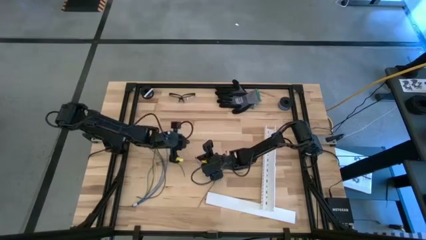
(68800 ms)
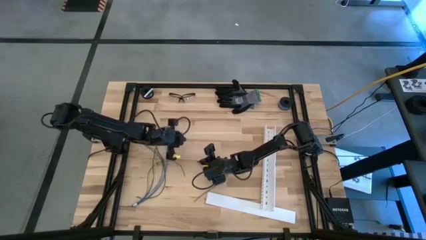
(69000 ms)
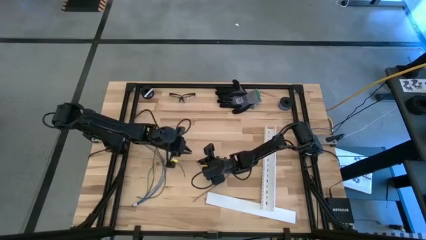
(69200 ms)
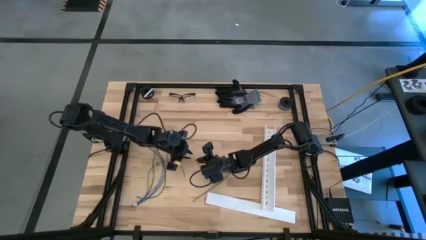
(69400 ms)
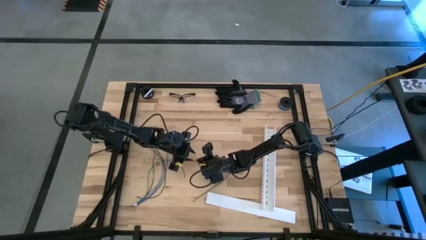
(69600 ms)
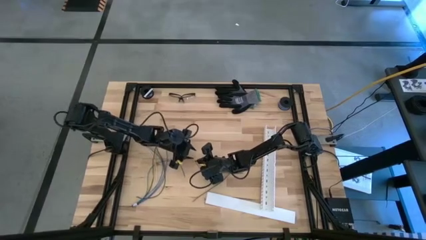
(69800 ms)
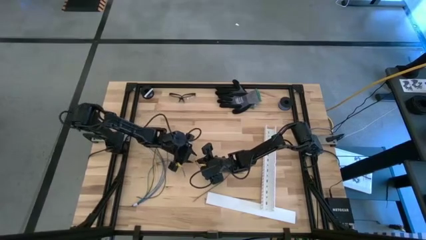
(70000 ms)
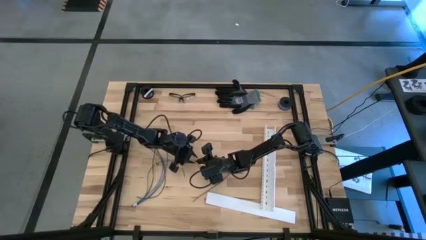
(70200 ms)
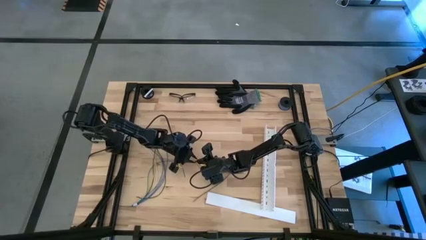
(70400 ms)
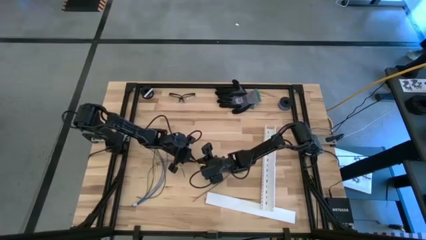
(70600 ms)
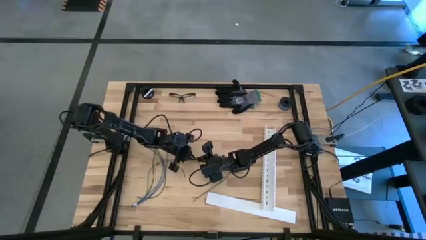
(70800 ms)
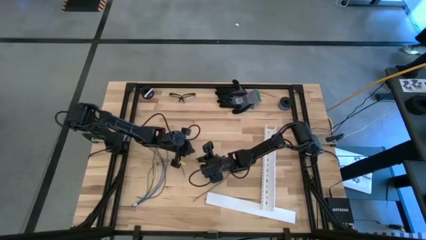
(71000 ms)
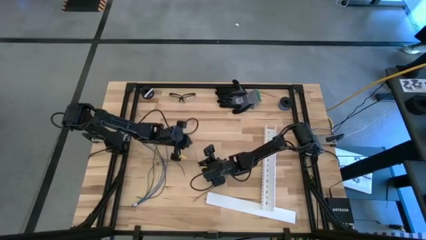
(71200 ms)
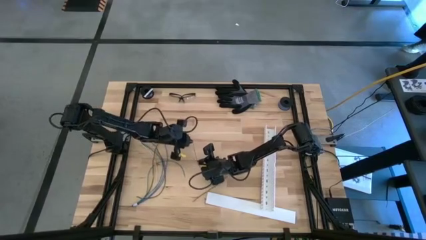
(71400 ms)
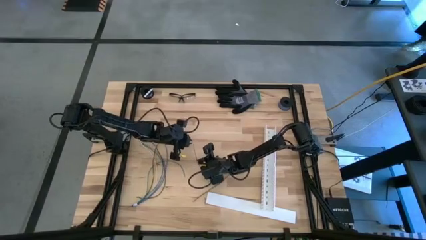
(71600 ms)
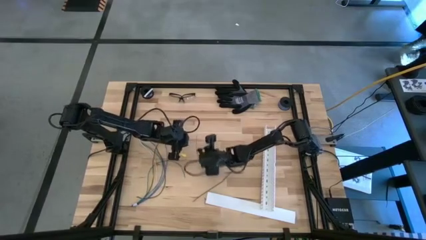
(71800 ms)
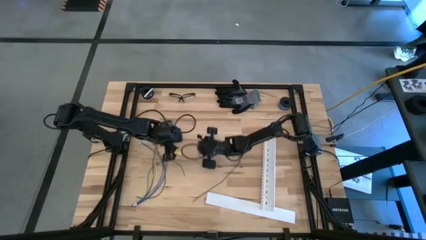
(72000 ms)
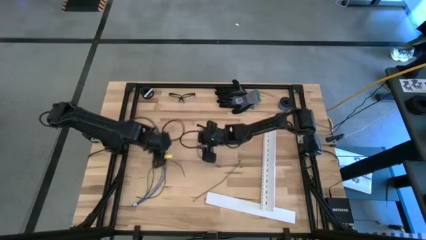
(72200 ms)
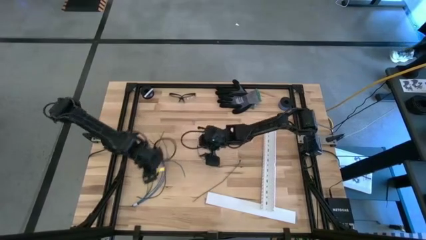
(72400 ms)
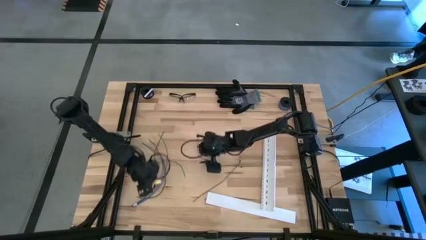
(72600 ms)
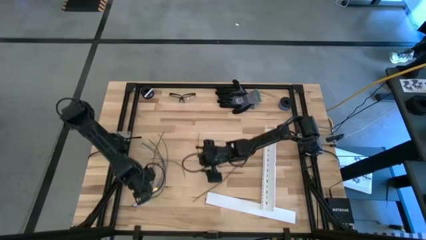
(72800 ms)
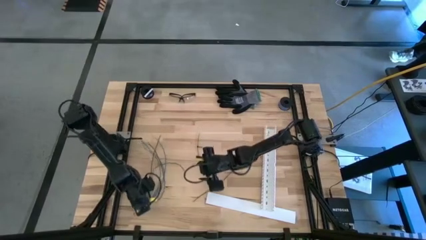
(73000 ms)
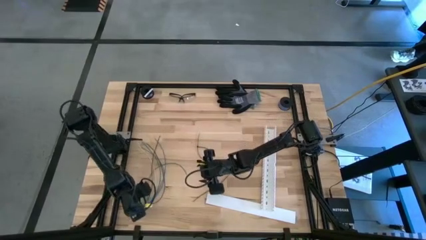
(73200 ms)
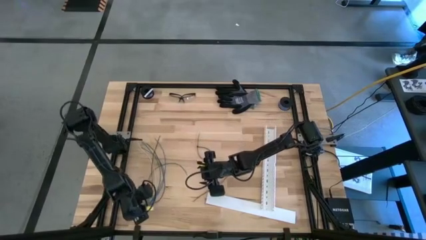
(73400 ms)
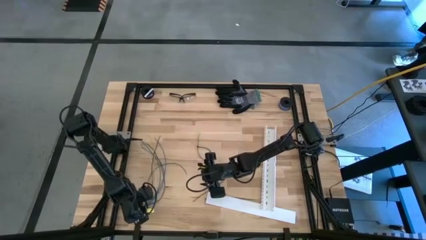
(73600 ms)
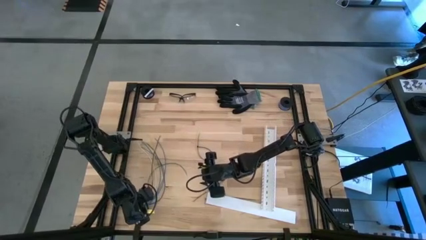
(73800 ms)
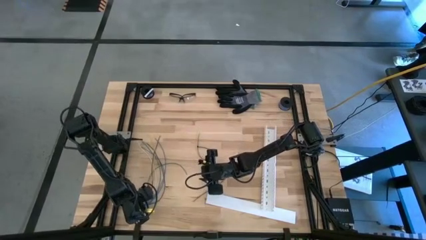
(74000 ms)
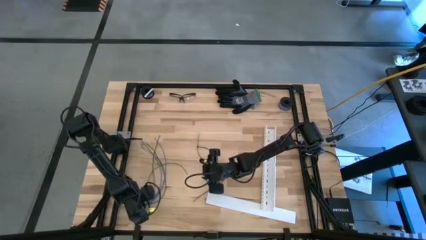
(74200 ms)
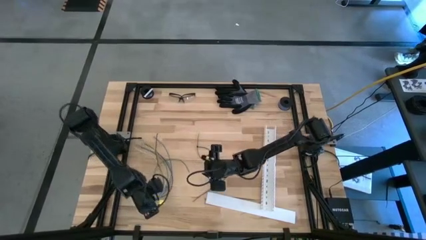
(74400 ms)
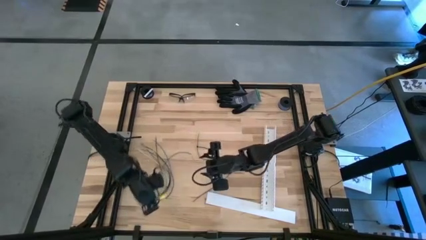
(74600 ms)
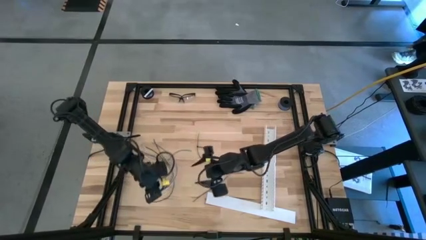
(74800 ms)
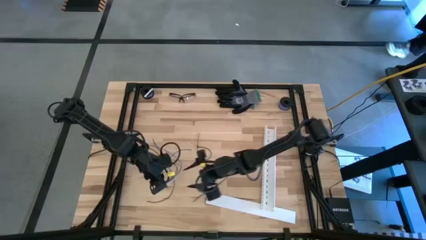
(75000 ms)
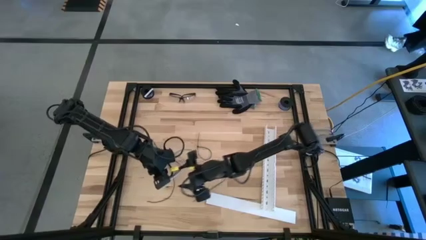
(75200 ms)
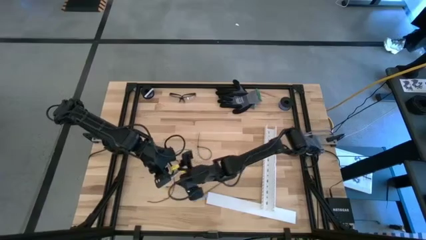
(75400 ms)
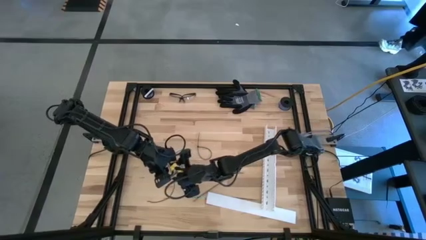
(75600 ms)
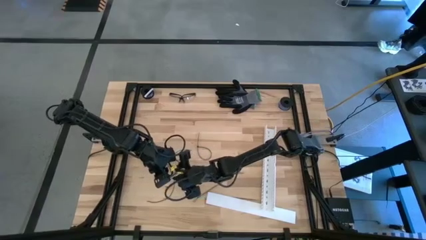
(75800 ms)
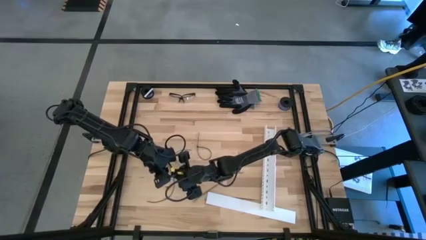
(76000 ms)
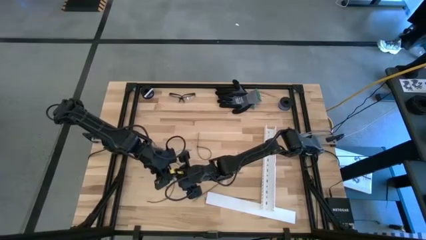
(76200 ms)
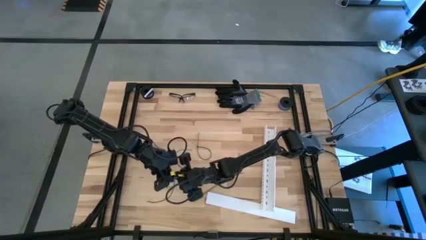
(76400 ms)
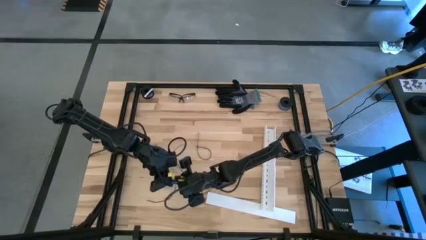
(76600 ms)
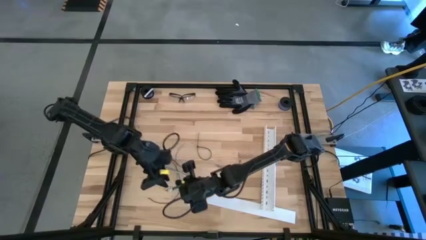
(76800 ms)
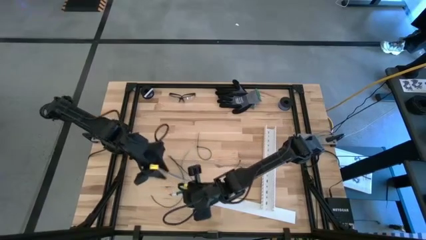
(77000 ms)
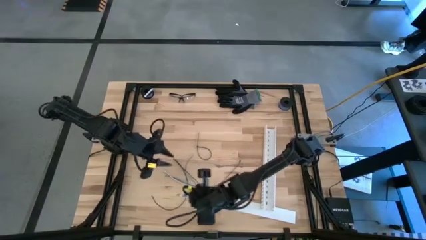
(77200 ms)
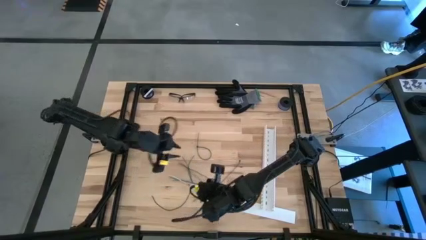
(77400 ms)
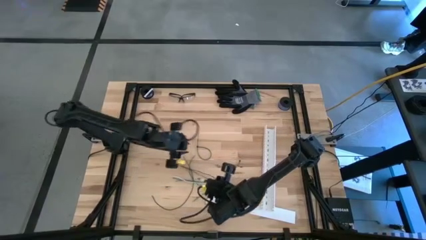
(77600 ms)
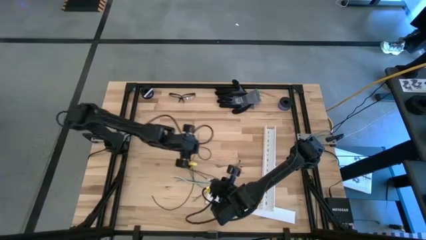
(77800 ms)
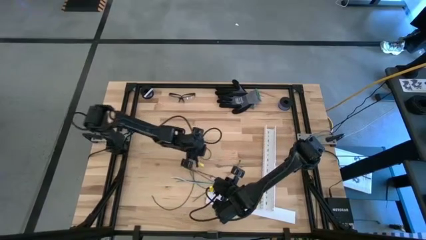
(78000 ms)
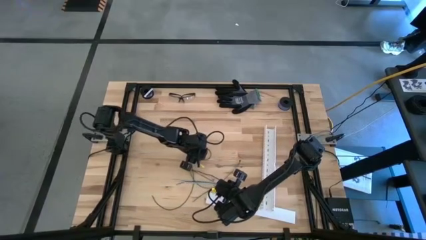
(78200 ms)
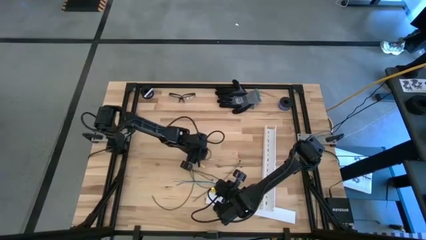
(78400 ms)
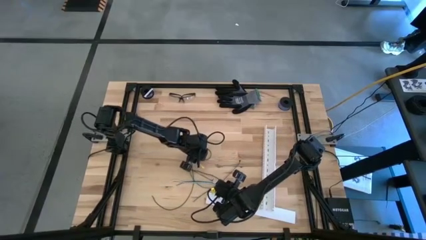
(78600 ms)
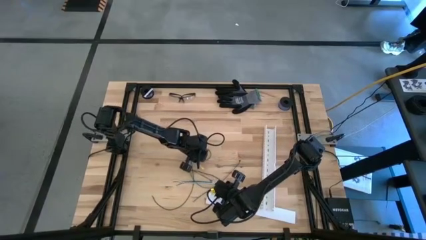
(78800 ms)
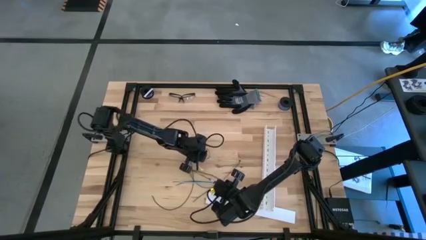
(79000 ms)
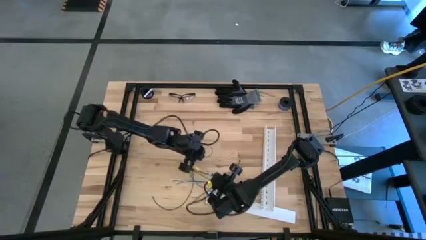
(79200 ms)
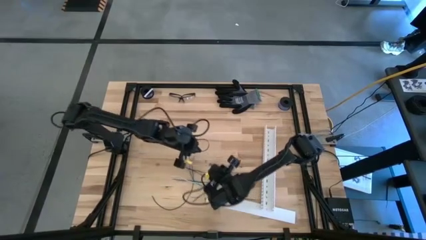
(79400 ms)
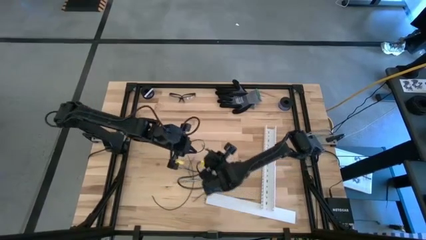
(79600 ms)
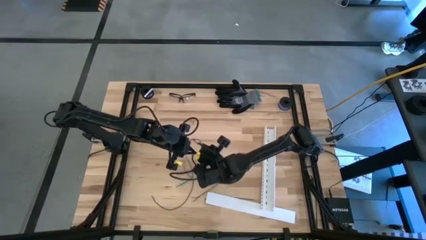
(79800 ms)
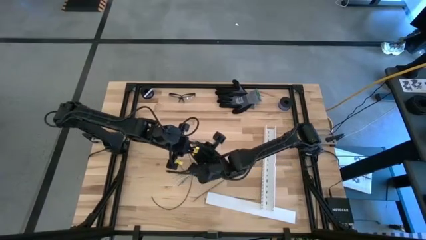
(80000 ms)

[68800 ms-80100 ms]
Task: Ziptie cables
Wrap the cable wires with the black zip tie

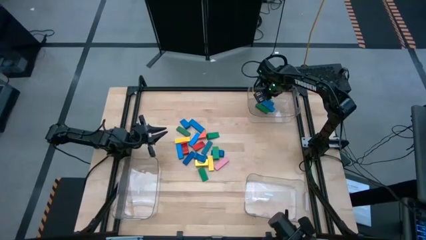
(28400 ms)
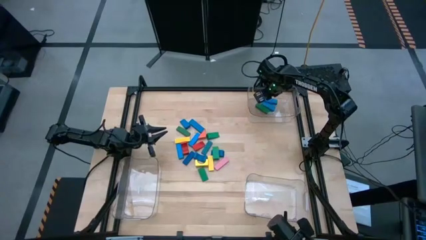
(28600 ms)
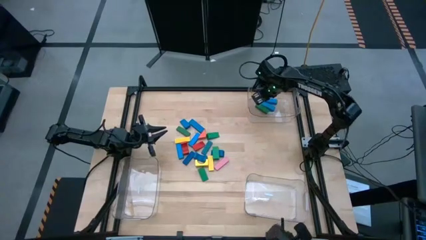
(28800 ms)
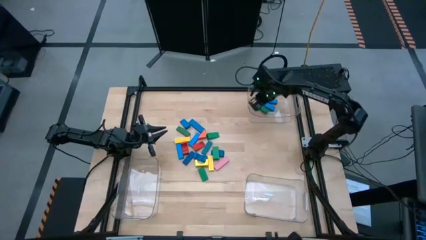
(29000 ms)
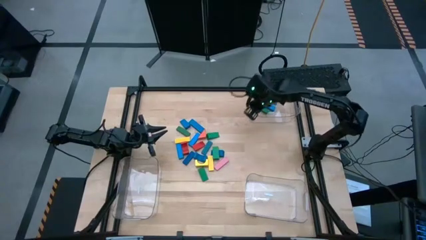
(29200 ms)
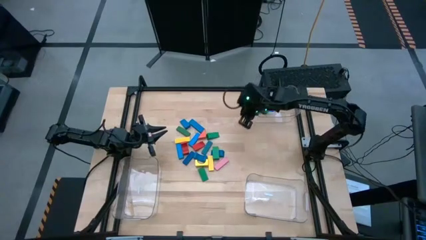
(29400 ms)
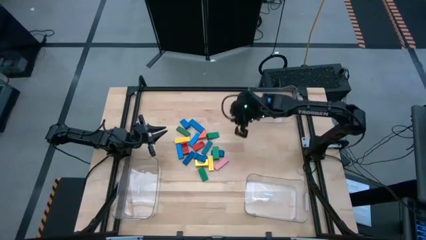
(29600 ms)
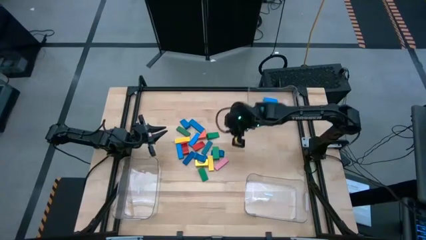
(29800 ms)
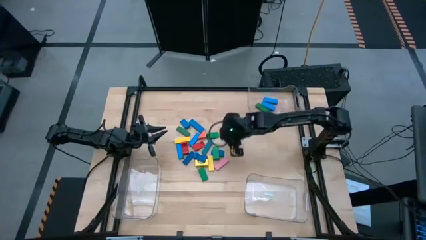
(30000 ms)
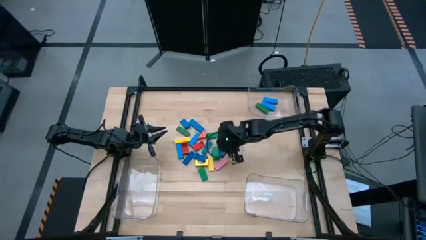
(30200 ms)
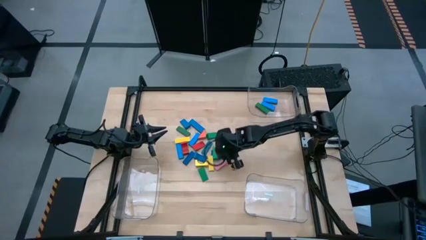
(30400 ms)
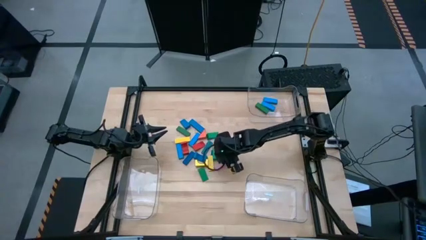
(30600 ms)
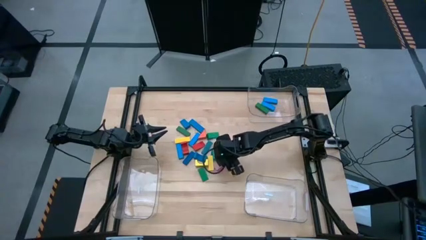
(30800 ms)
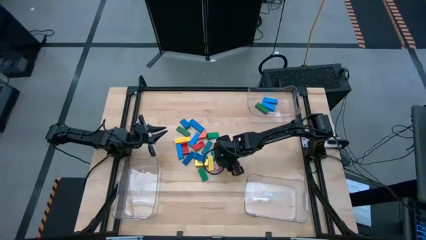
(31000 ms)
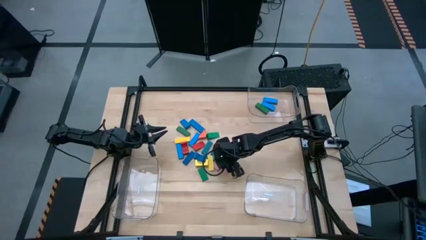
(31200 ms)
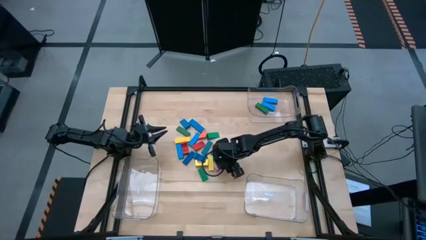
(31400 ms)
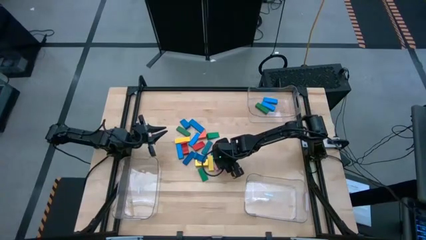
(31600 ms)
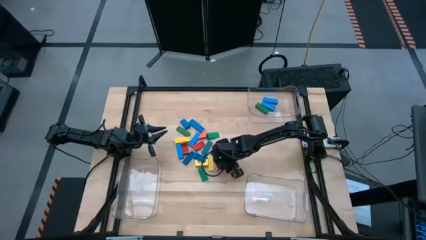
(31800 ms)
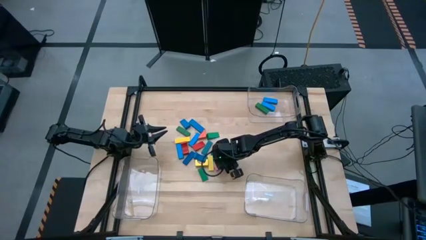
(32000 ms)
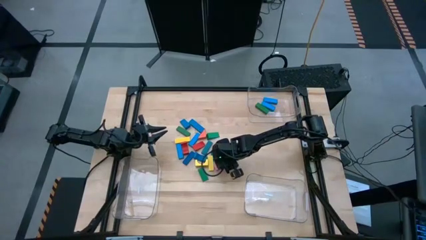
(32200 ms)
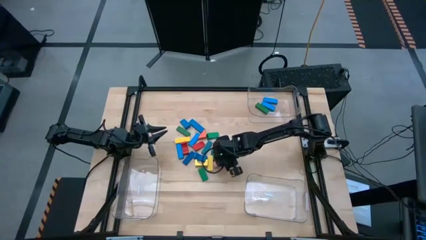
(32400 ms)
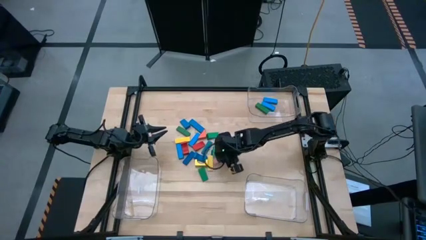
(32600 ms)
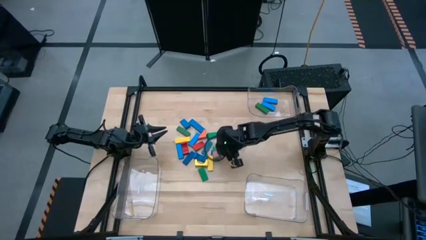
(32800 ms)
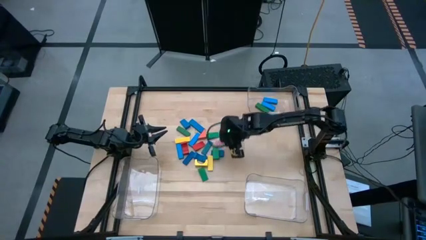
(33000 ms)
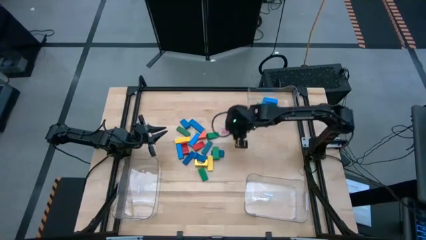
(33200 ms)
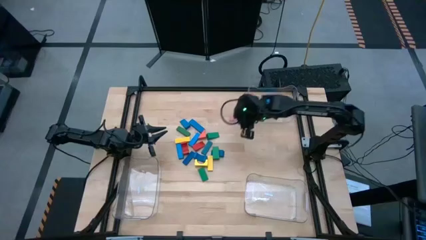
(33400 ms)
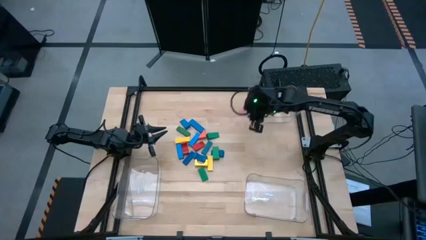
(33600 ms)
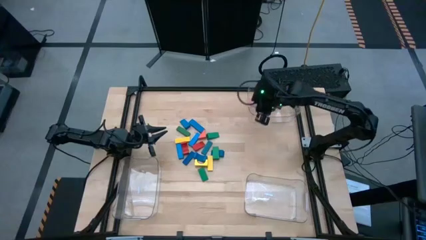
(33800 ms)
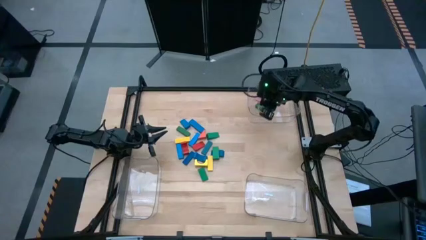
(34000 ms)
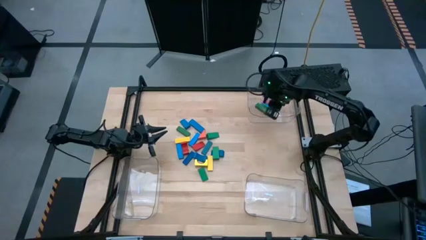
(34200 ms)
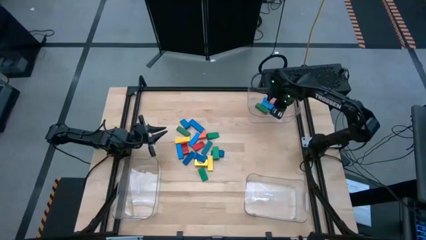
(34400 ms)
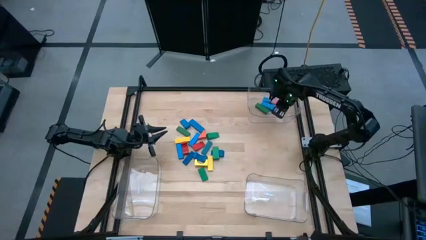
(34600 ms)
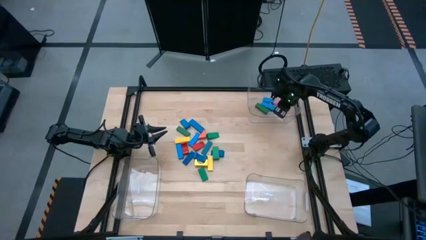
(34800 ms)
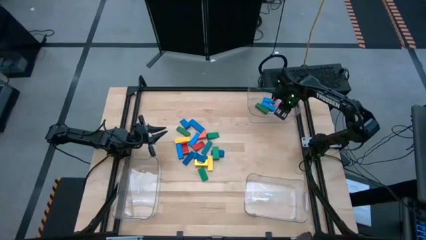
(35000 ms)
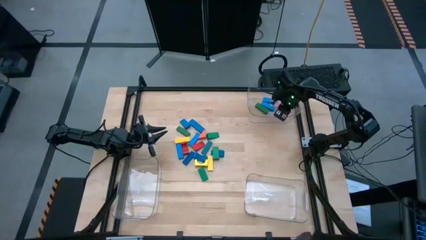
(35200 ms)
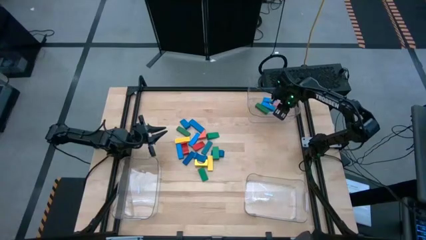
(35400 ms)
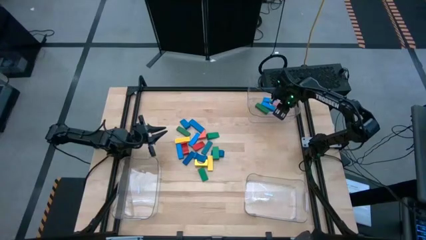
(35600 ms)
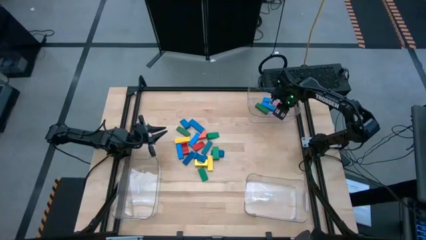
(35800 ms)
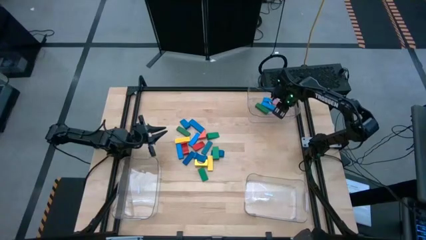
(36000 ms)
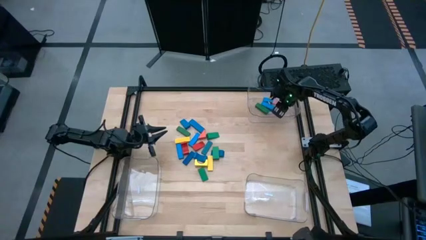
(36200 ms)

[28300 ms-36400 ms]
Task: Sort blocks by size
Put the pink rectangle block into the top transparent bin
